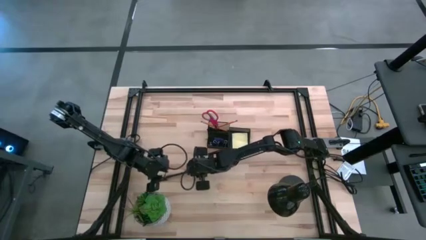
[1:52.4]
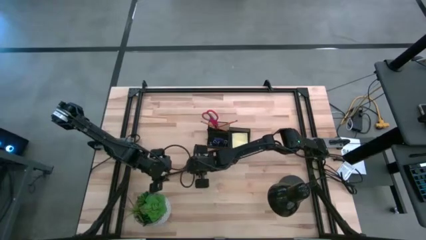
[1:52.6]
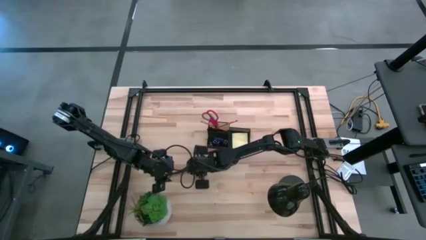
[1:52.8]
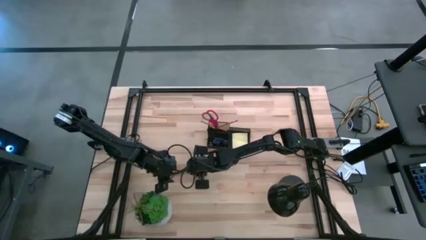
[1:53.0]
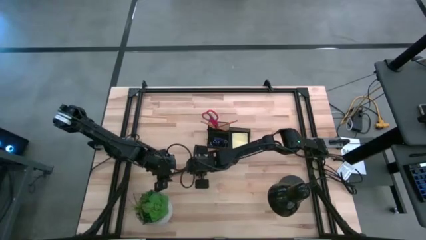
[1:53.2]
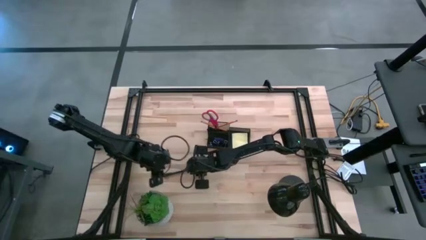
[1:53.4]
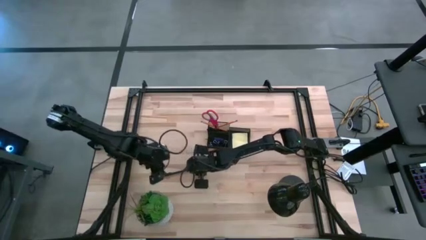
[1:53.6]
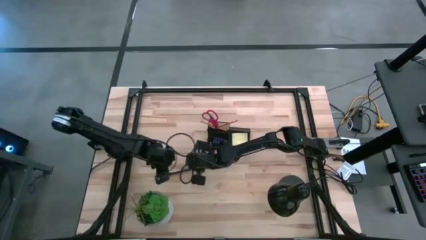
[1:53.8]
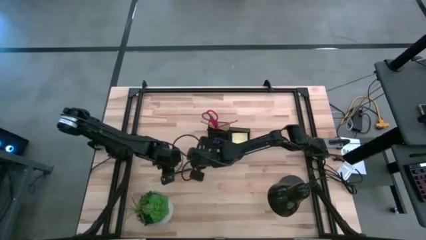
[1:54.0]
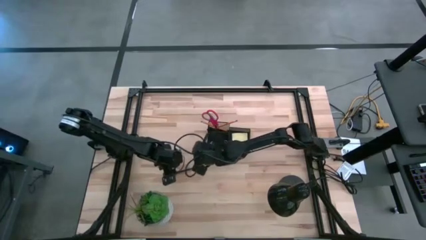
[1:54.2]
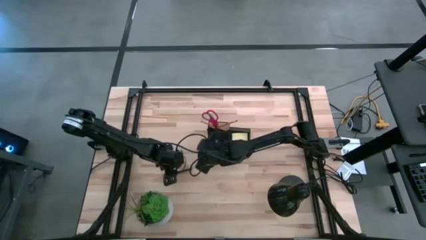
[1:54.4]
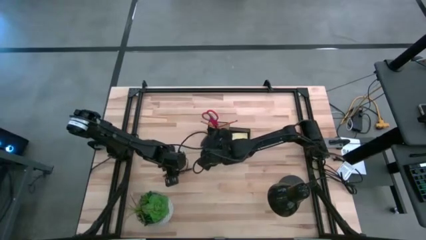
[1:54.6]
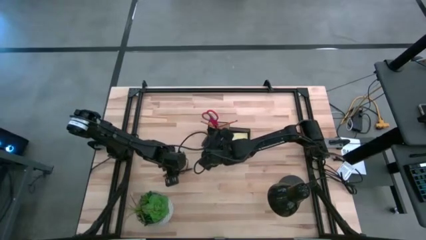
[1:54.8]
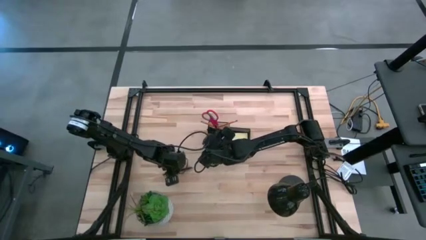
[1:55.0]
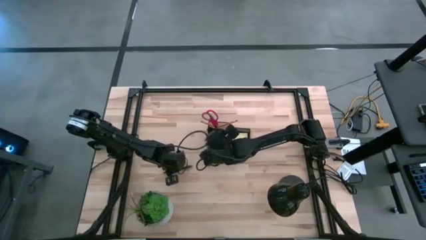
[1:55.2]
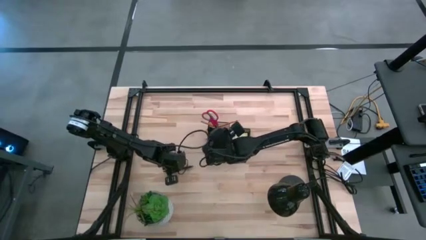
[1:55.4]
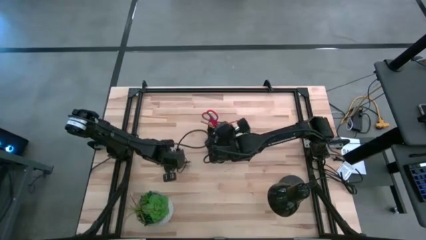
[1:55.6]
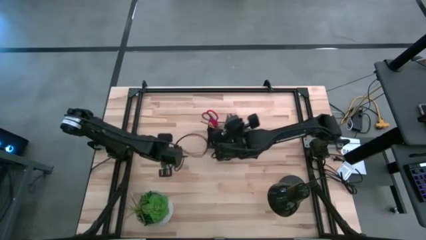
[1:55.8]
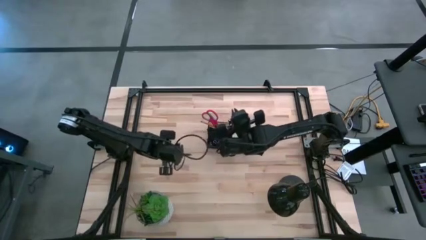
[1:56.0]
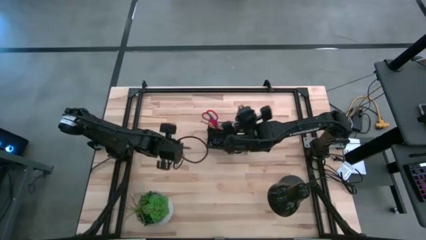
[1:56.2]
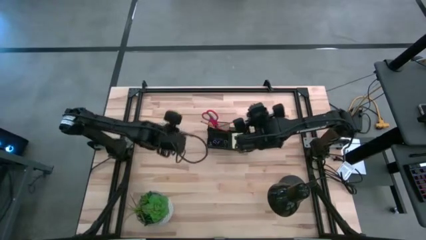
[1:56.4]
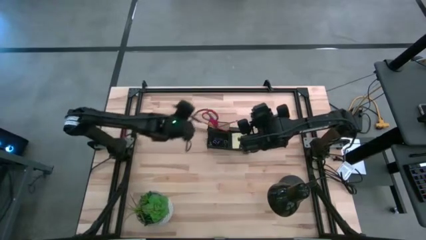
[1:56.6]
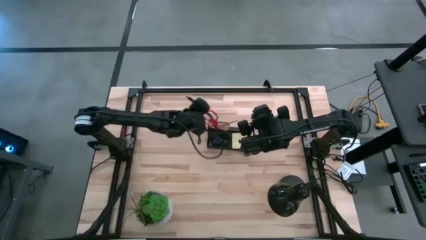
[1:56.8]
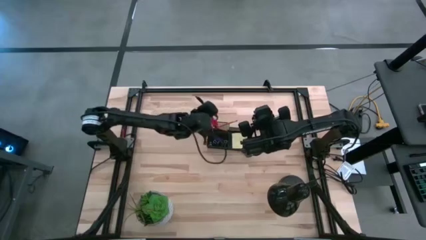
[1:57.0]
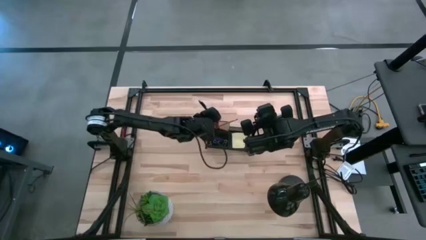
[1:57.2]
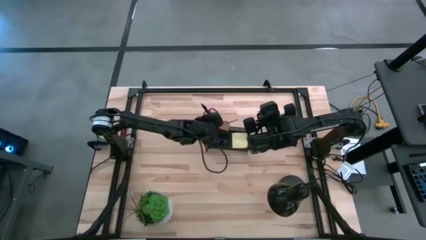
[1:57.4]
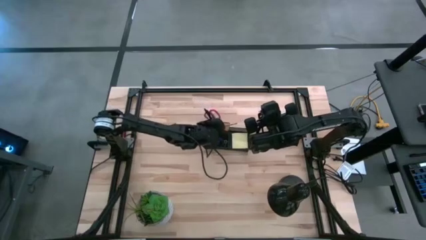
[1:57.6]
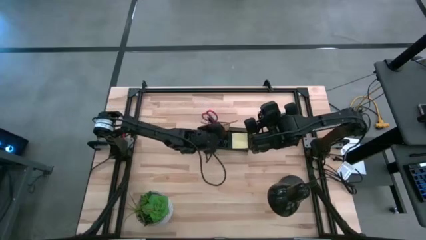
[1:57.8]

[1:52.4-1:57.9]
Task: Pick and place office supplies into organizer
Put the black pen into the desk organizer

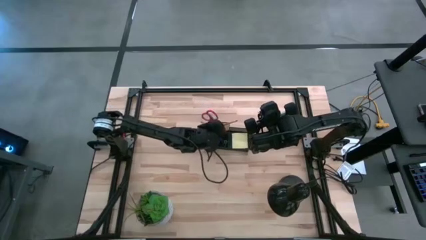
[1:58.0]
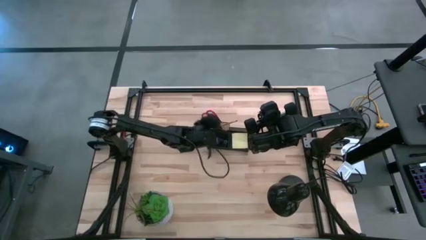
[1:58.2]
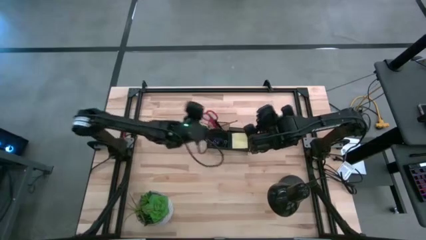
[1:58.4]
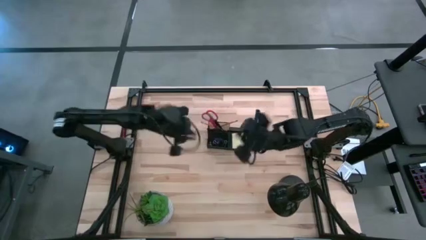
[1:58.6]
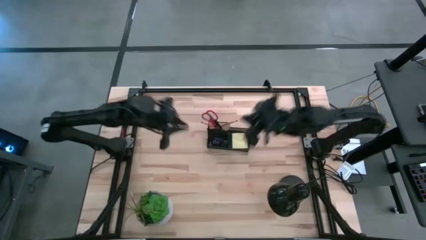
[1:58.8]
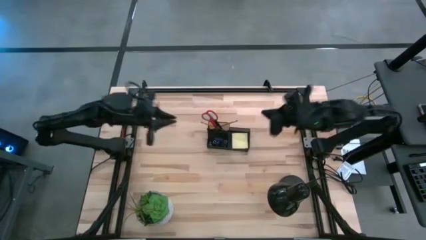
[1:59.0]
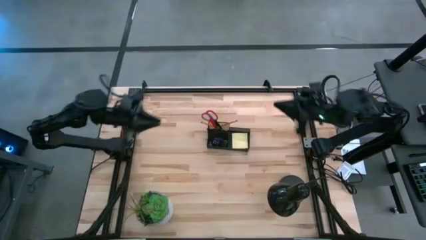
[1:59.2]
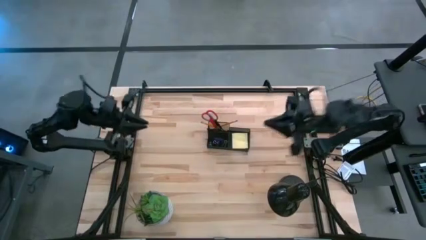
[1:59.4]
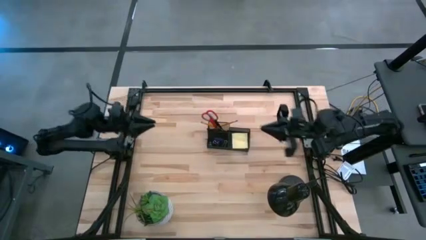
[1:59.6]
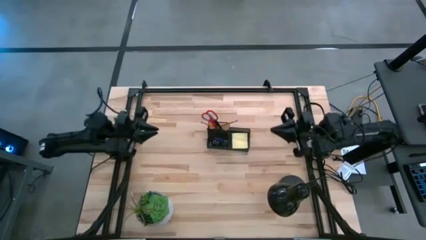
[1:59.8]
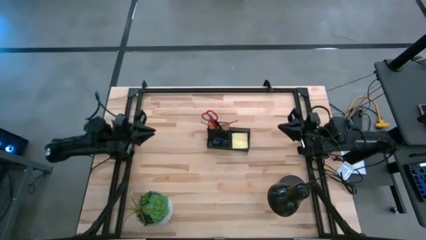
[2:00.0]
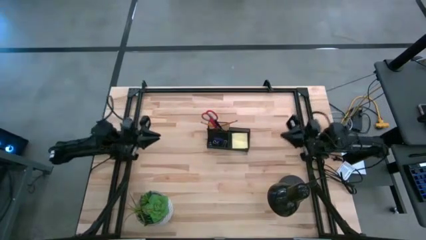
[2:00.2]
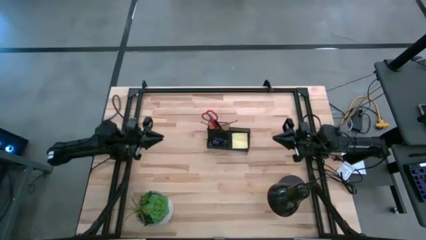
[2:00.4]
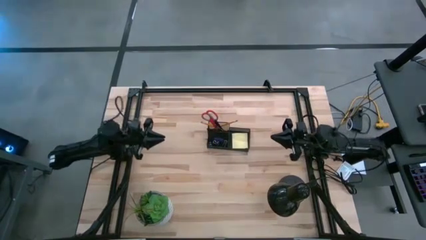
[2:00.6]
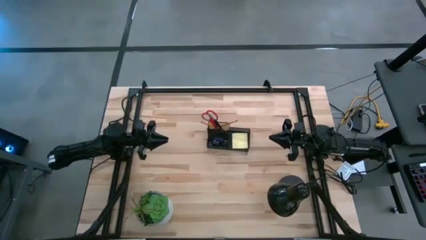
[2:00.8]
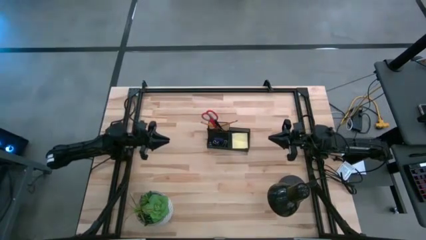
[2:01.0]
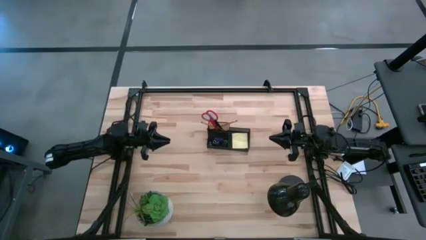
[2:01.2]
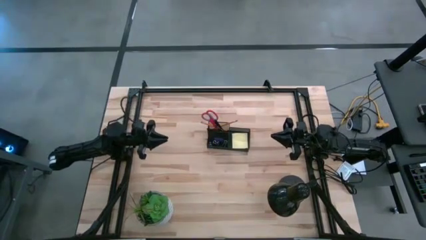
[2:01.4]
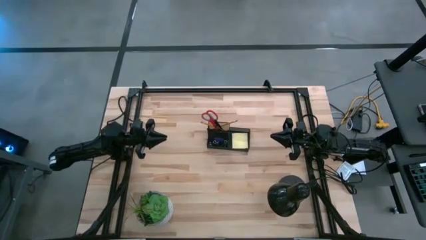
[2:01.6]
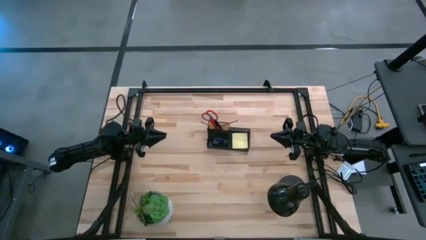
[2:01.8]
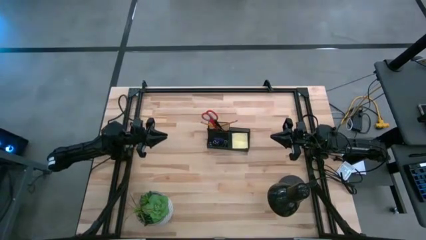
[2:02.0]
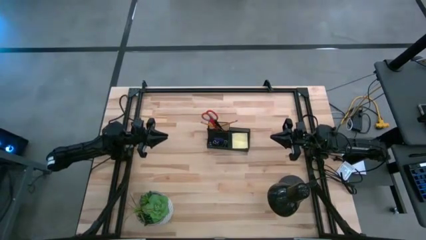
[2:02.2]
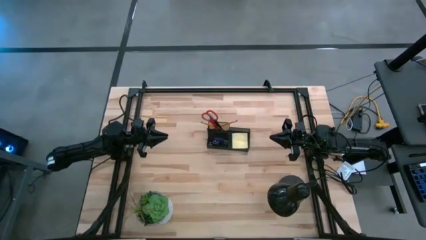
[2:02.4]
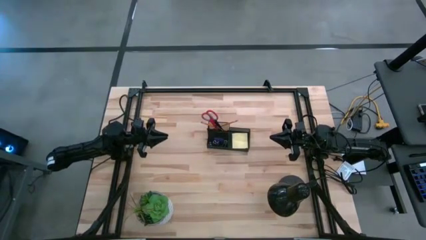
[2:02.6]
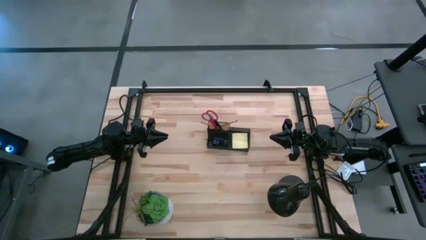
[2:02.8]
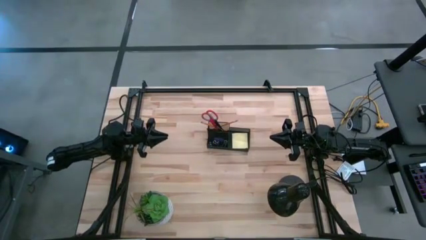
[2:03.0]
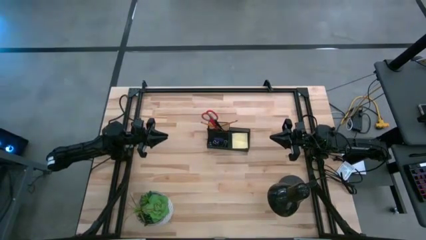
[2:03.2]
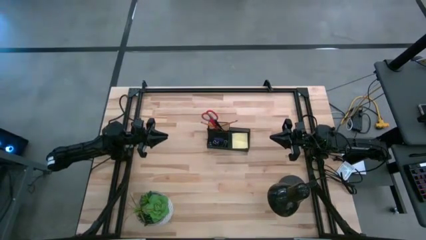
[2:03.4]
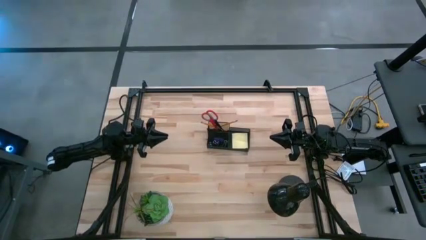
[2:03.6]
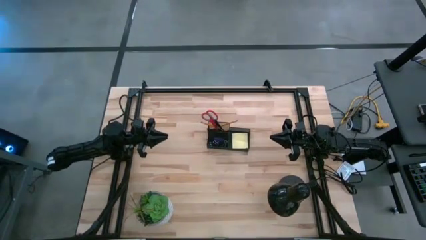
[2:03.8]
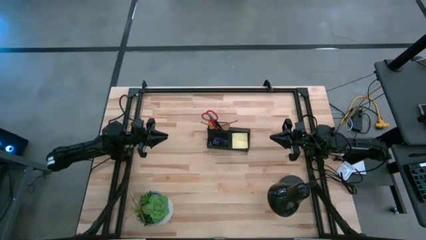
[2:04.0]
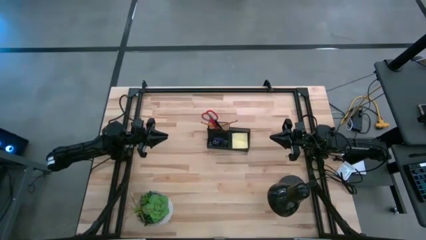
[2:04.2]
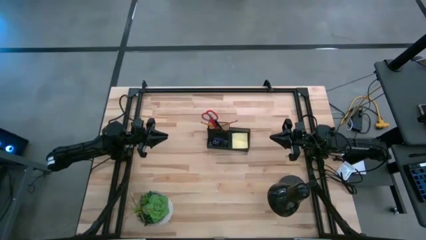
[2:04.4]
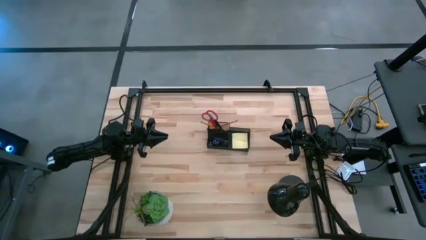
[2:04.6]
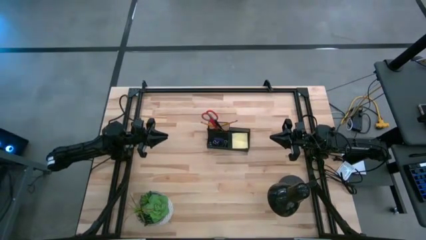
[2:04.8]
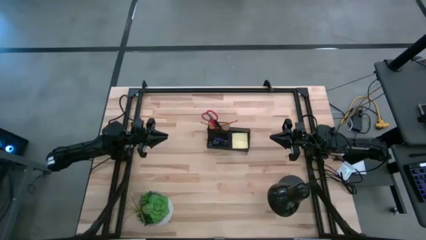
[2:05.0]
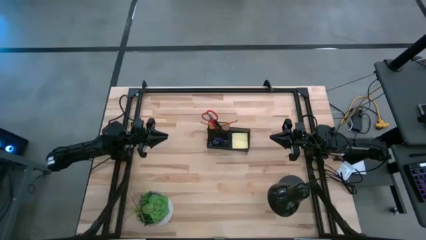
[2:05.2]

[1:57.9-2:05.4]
Return to Home Position
